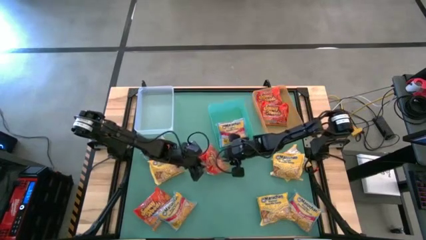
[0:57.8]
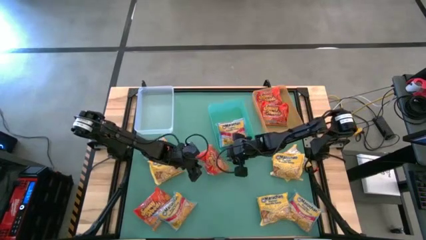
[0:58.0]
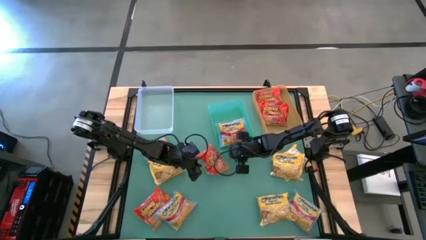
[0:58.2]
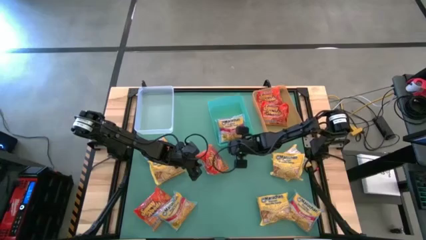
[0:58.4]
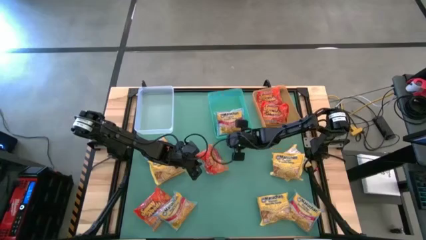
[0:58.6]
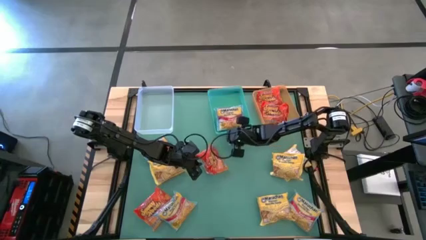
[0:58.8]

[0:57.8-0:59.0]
Task: Sort Maruchan noodles
Adjust the green bin

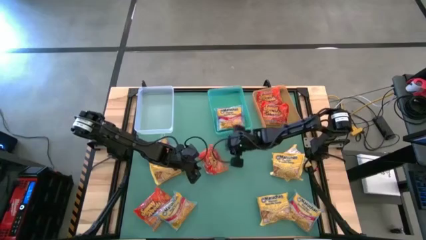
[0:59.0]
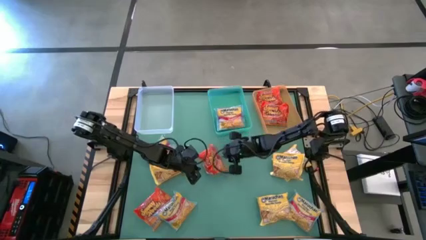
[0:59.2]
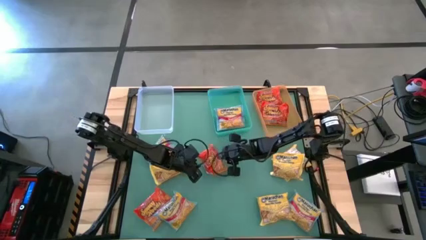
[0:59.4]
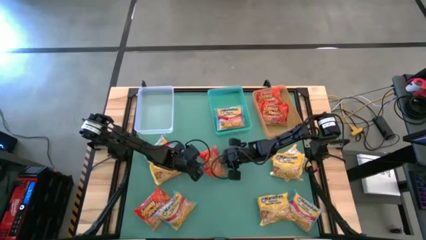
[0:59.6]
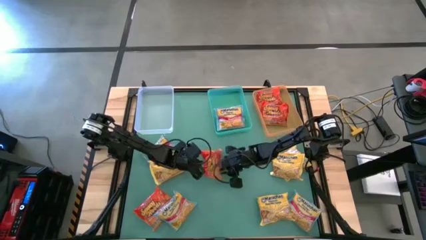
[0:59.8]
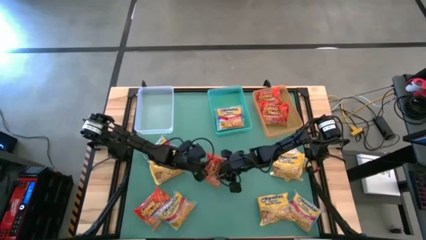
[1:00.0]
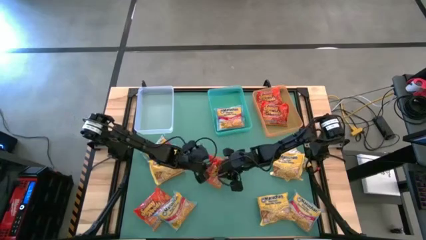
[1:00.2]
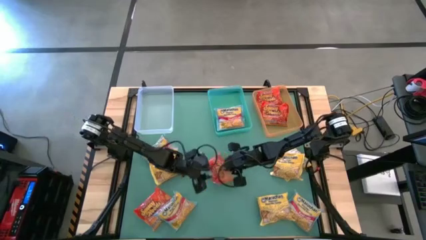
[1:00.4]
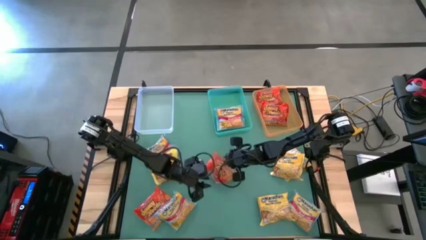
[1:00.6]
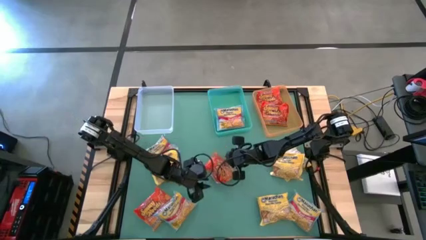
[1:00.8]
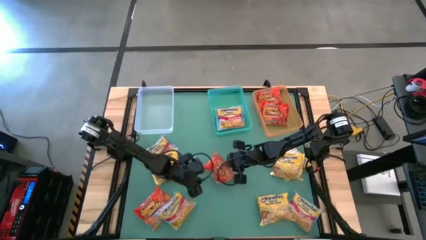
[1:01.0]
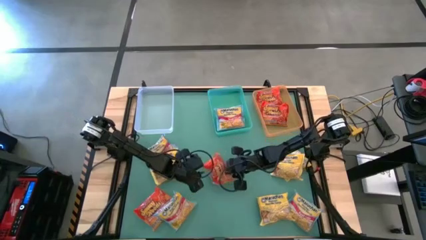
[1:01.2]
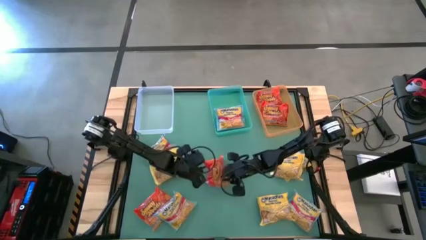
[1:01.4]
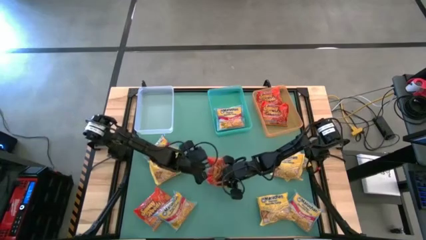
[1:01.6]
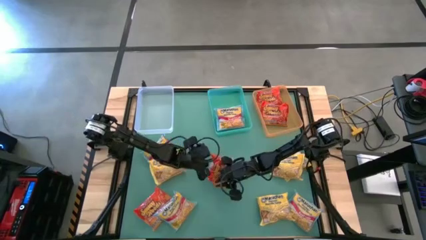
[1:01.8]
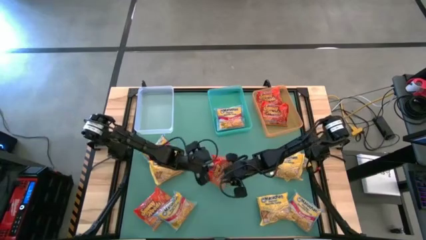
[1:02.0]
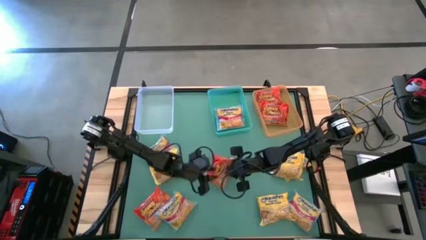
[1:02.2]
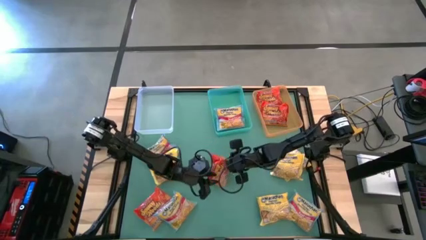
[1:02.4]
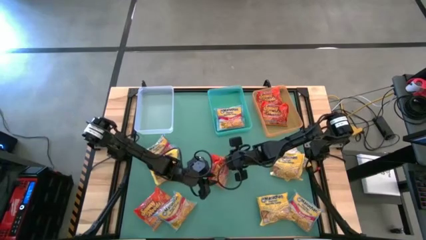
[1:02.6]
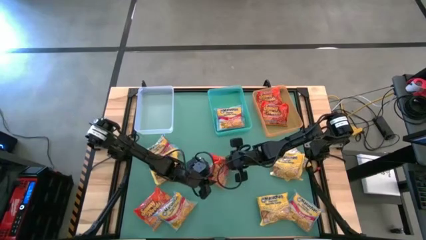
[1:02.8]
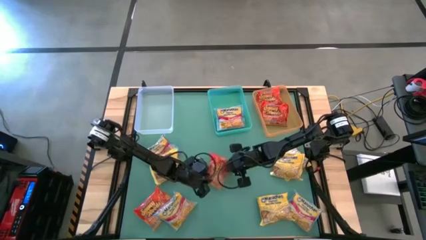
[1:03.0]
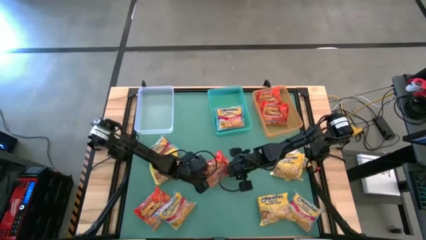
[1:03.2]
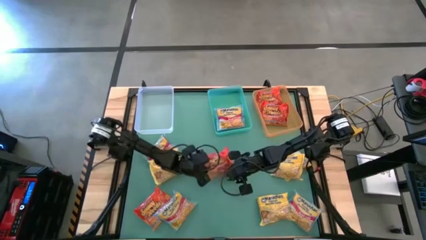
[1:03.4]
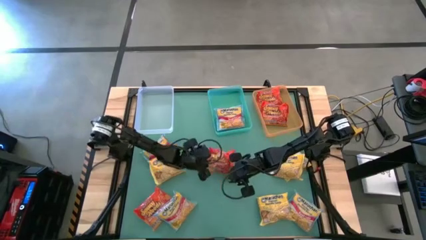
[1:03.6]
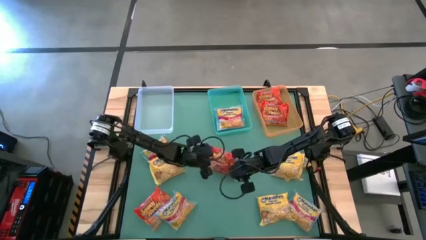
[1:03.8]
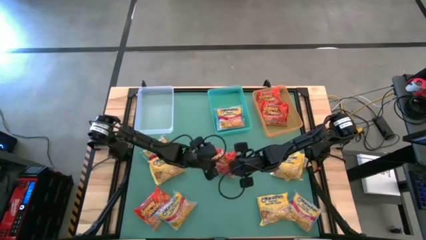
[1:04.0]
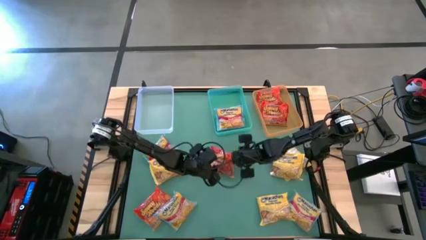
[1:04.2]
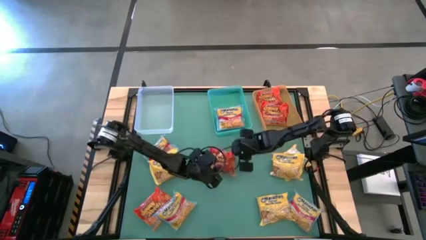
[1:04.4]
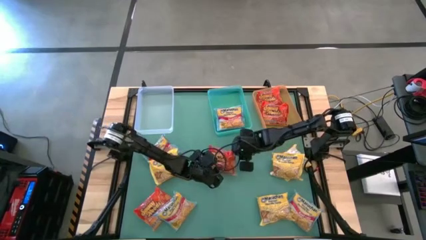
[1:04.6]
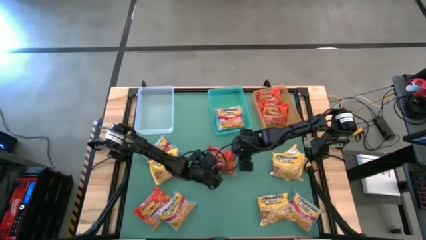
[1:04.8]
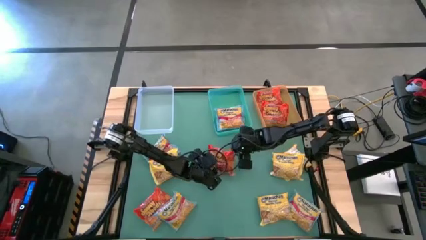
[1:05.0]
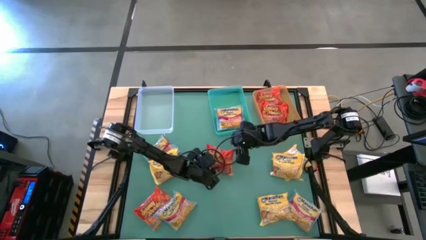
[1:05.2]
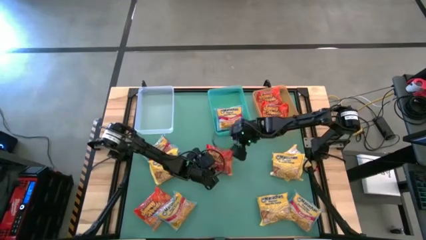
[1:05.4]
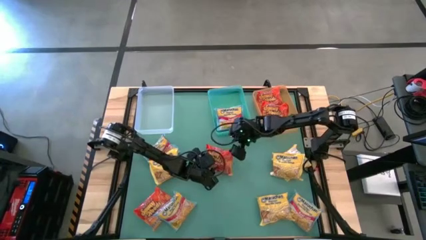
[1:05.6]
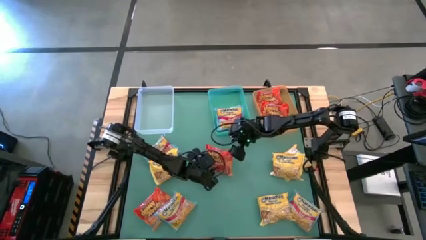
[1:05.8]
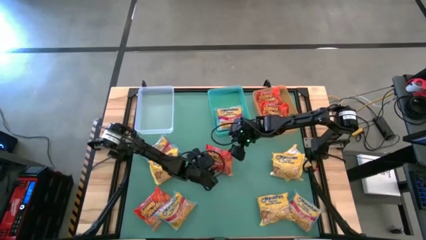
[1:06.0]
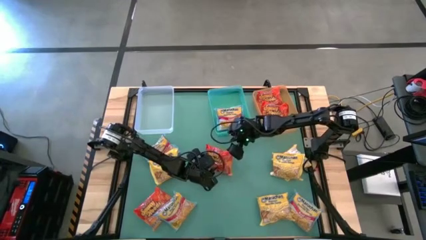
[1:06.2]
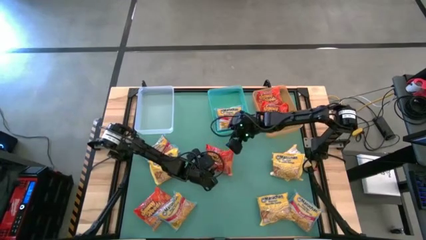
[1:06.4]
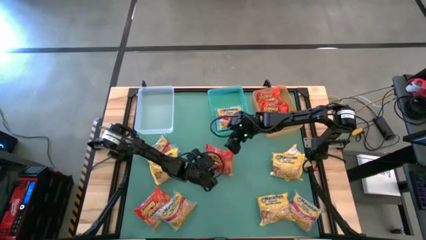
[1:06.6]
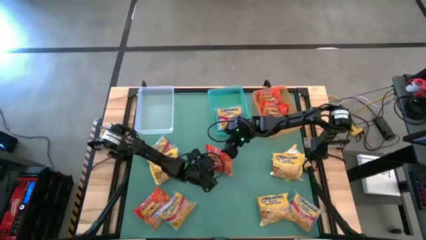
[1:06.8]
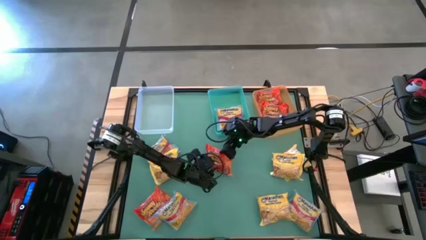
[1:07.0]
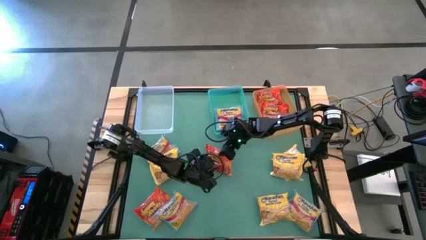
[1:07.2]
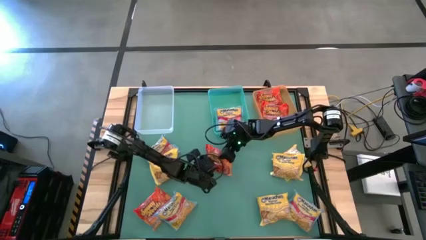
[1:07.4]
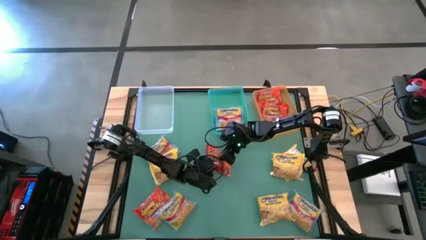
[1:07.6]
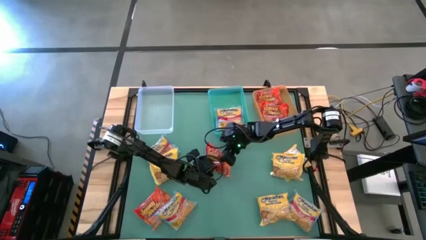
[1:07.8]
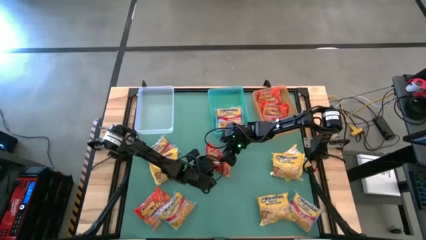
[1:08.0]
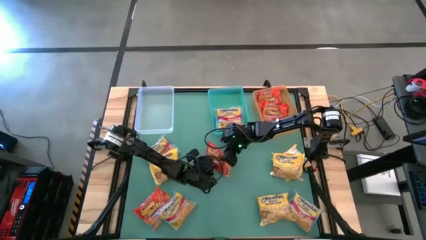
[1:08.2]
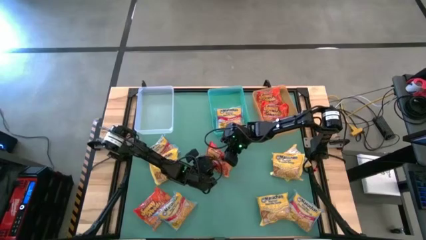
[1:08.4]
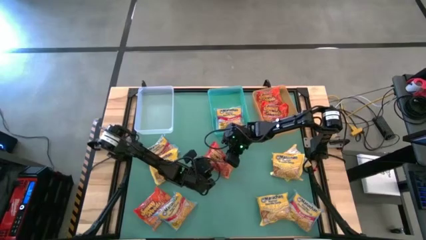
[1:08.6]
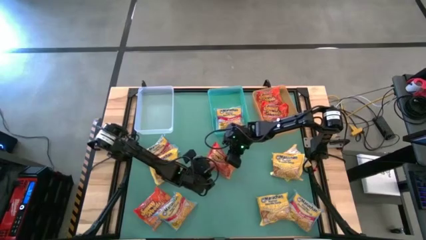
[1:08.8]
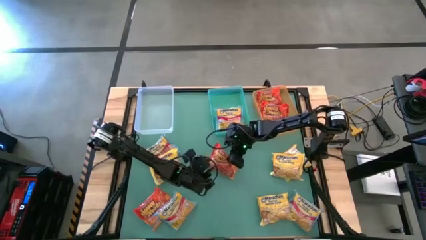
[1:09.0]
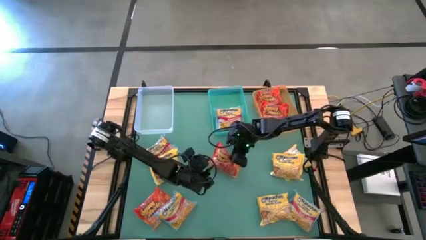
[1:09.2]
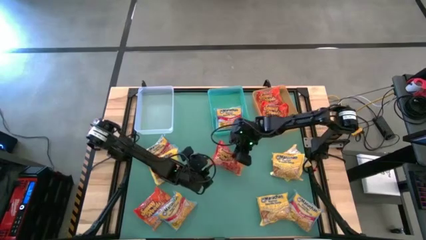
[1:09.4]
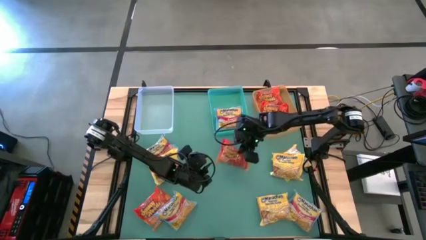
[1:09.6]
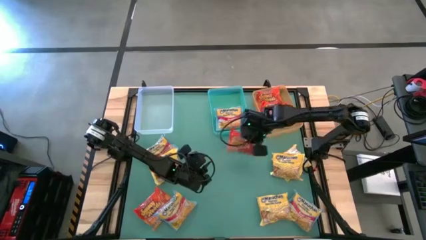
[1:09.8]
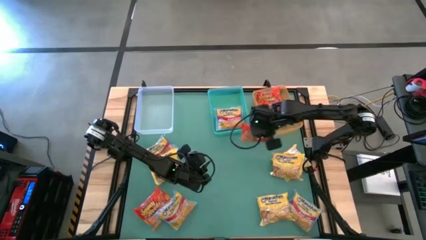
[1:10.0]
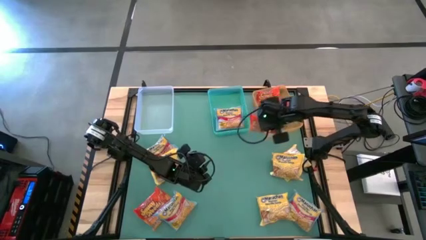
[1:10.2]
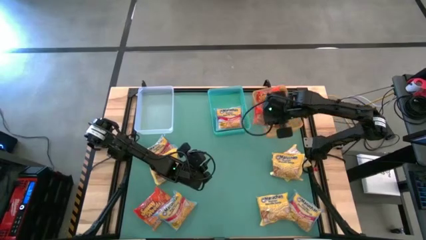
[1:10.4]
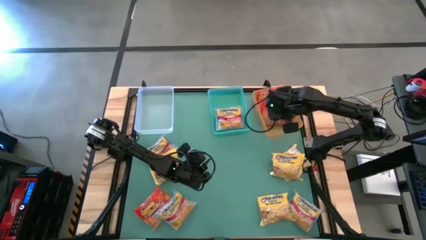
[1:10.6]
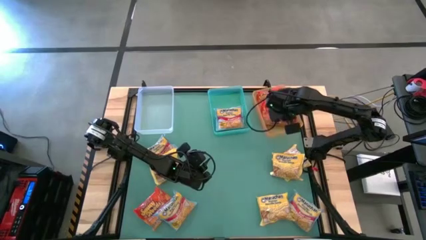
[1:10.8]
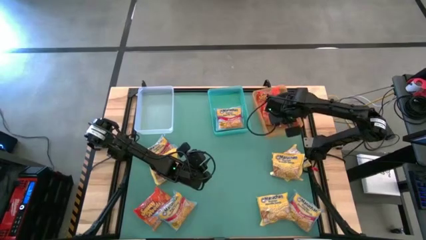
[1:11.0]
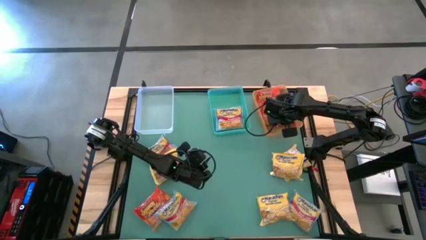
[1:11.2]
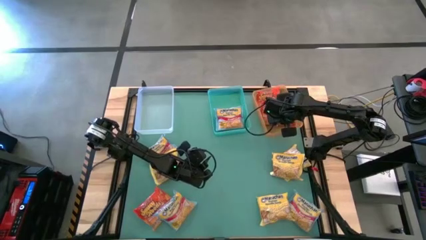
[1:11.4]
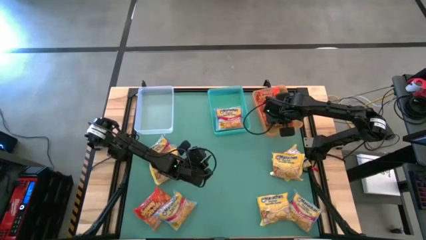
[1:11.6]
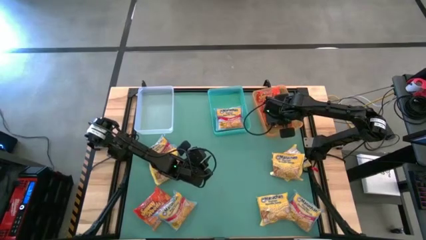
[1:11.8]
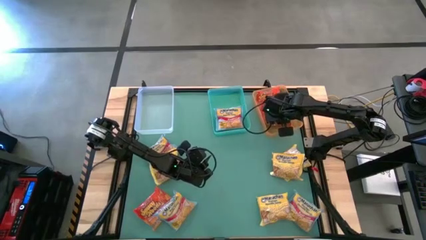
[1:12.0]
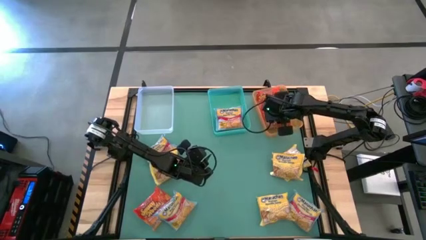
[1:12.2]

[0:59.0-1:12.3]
Put the orange noodle pack into the orange bin
